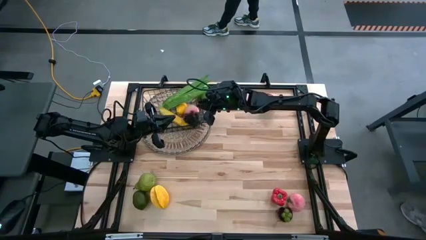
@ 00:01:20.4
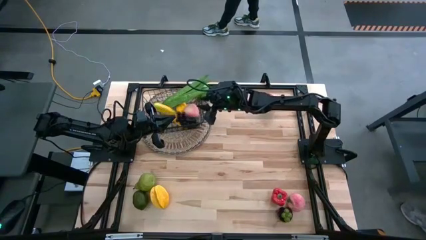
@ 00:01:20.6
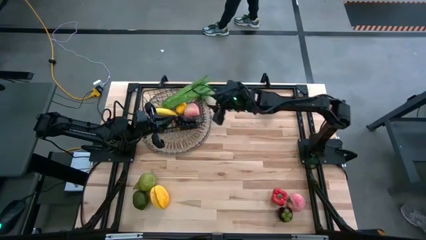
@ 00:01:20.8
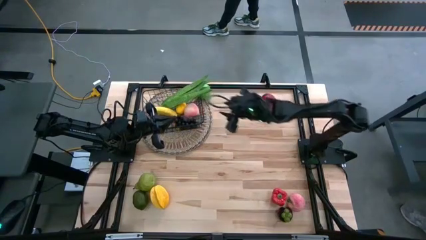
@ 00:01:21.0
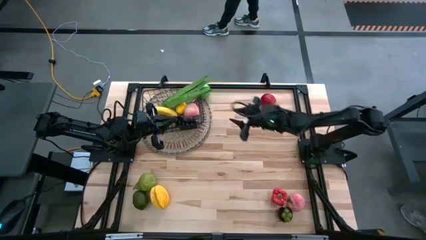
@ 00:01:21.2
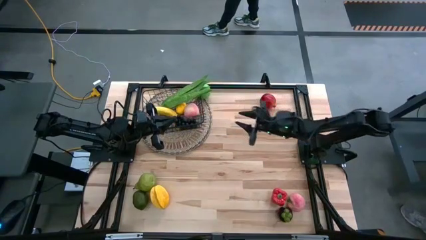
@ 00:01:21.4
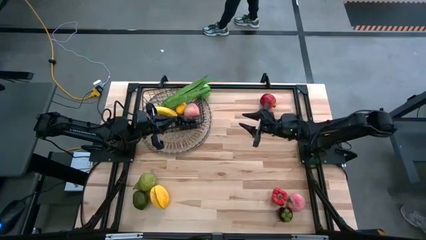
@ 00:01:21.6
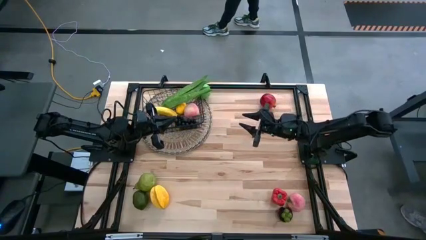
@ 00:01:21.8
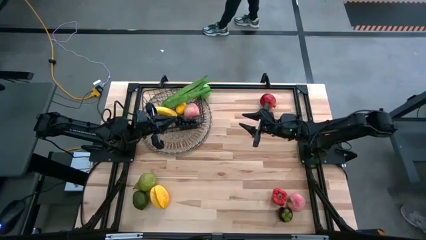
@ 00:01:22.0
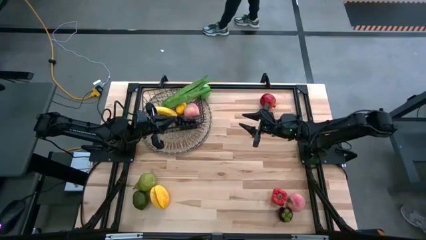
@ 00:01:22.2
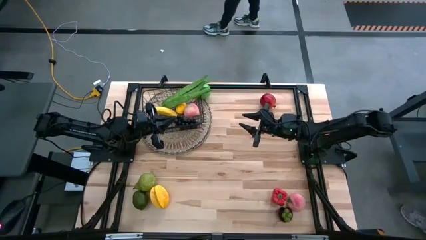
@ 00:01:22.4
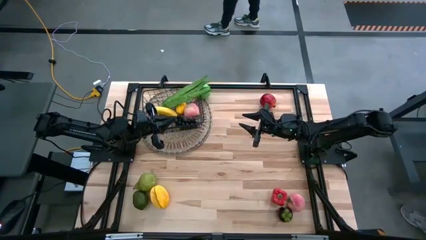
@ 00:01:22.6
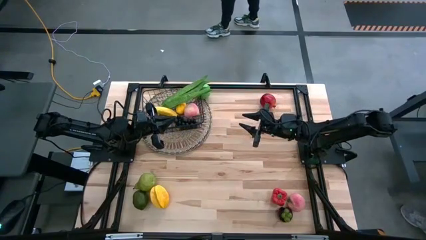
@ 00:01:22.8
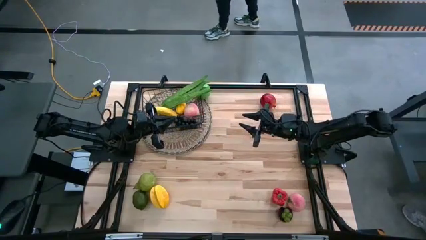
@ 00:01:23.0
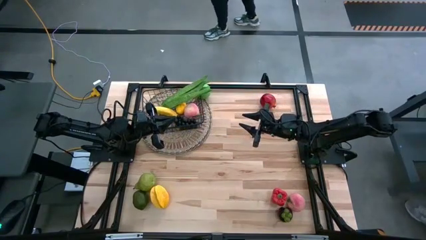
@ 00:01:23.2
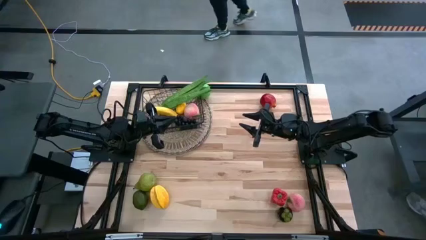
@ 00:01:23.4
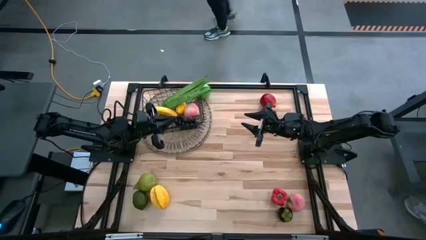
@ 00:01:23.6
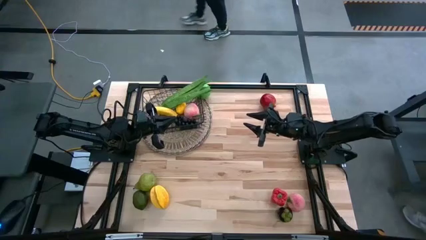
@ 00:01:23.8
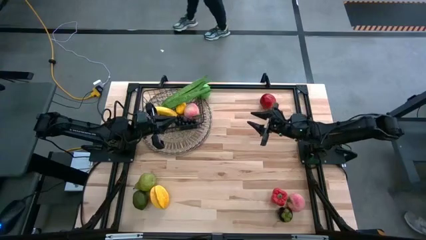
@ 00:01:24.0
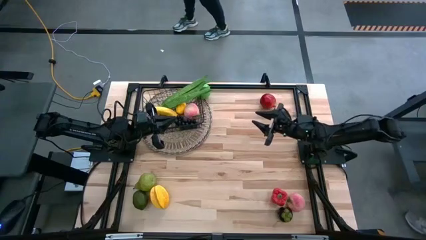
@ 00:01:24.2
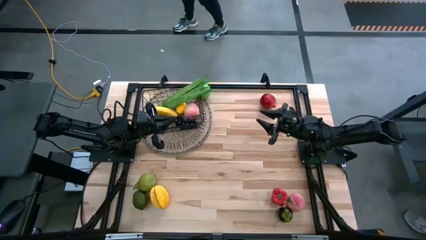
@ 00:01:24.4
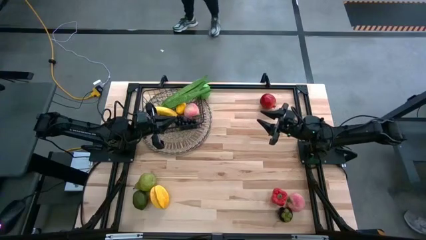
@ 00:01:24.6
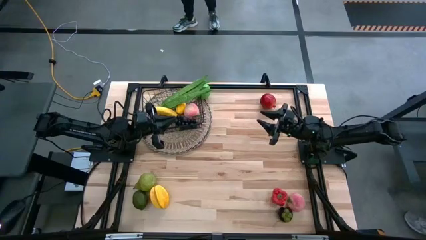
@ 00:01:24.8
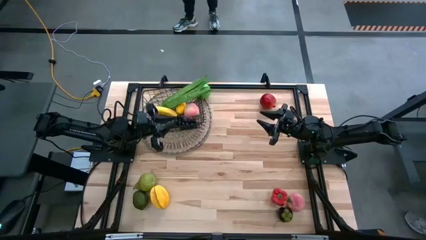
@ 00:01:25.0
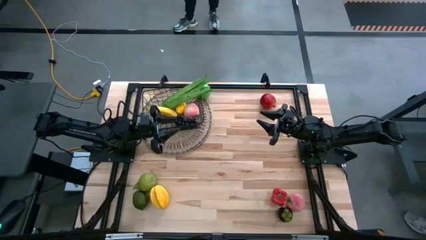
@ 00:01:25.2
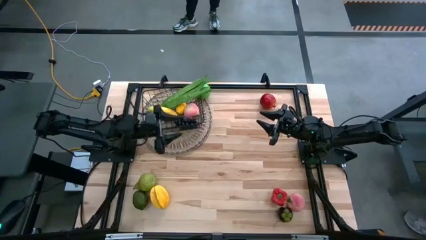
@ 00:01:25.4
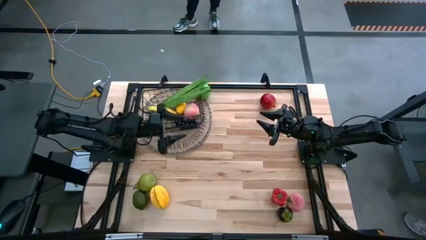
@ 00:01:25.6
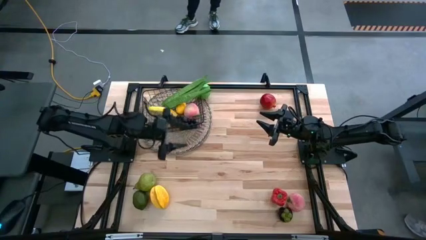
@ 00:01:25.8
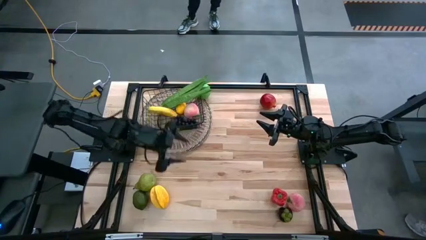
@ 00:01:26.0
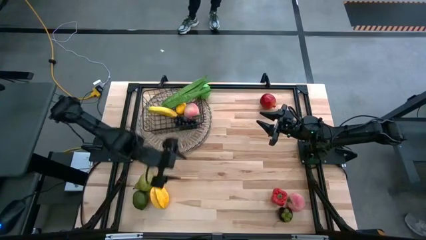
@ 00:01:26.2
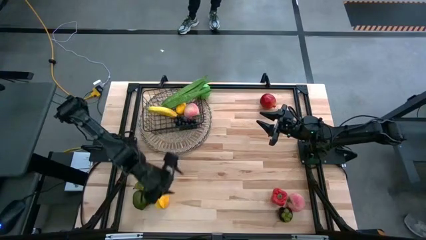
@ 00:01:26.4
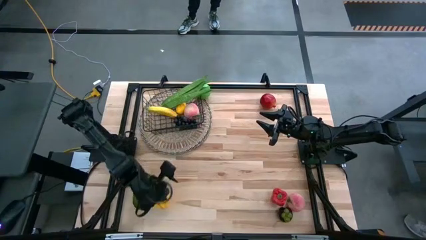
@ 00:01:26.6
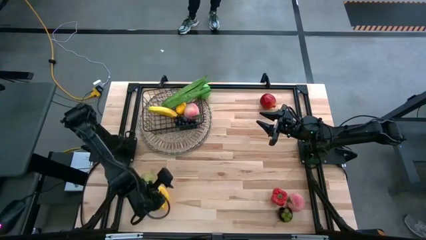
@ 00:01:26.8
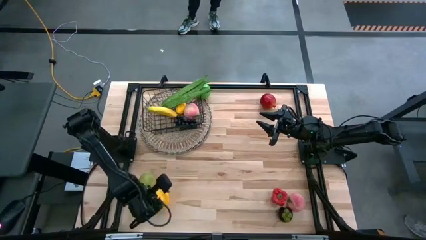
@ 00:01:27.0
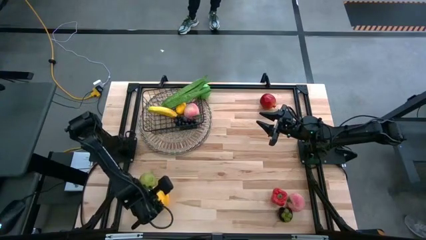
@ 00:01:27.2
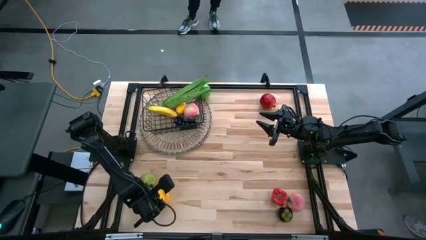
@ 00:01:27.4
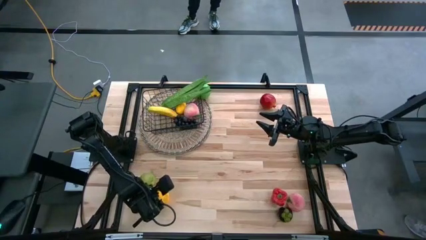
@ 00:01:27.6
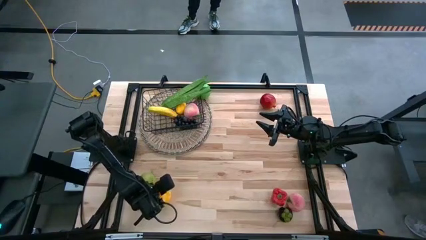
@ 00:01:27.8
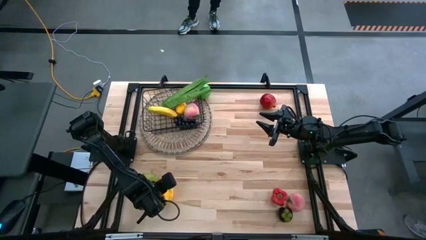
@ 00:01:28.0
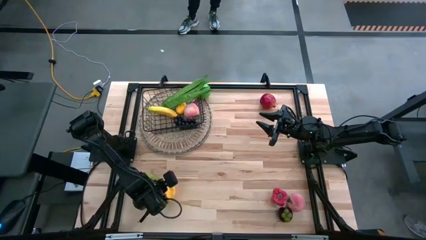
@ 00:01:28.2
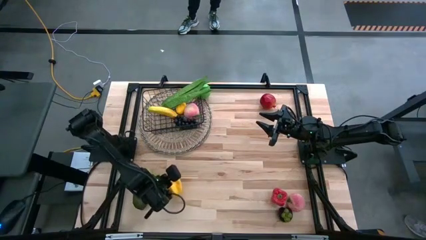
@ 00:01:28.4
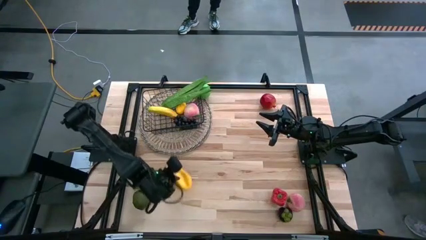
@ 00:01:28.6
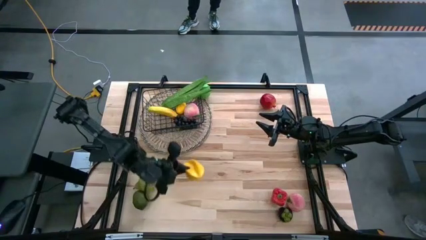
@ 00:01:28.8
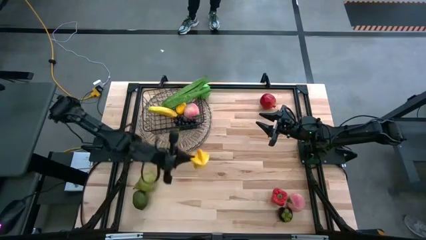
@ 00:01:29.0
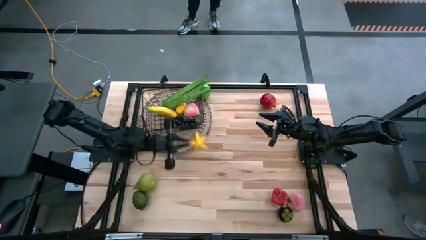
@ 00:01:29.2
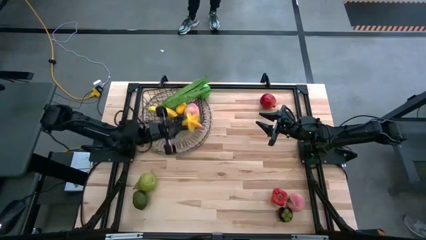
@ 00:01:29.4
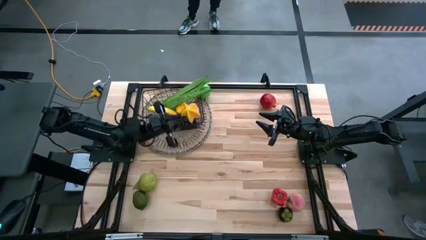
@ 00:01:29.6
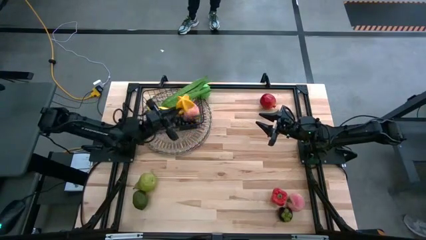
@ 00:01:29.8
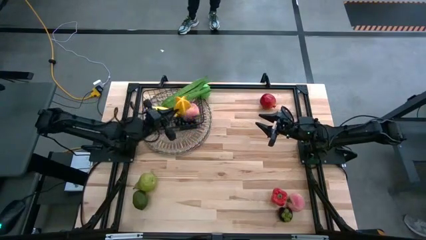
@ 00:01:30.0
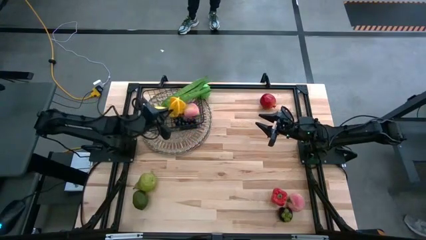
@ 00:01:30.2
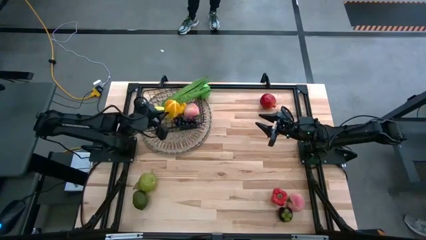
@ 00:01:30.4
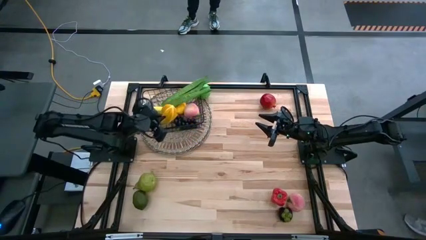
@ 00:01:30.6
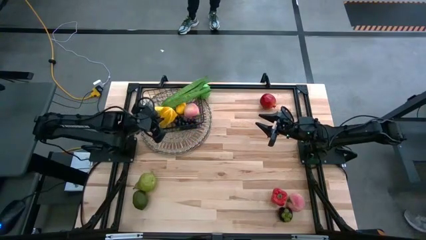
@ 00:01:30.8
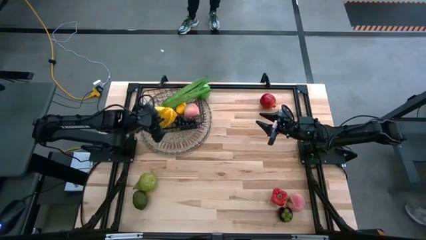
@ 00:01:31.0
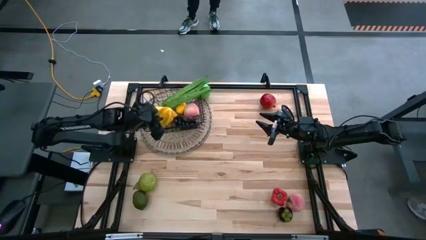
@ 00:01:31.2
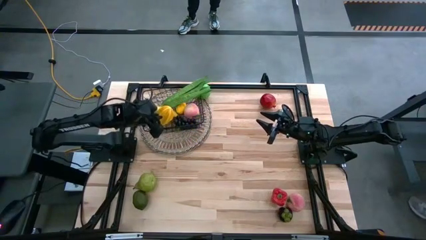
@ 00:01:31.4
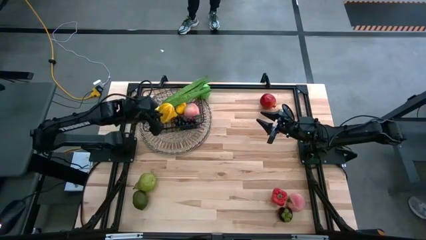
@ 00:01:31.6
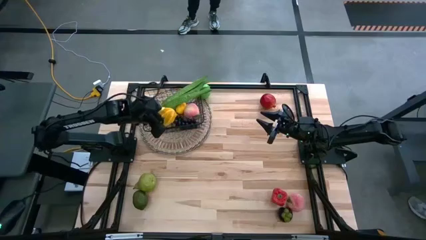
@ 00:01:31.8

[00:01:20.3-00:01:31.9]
Task: Build produce basket
Put the yellow star fruit into the wire basket
